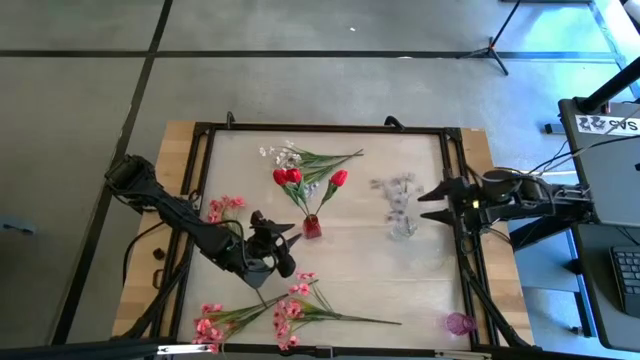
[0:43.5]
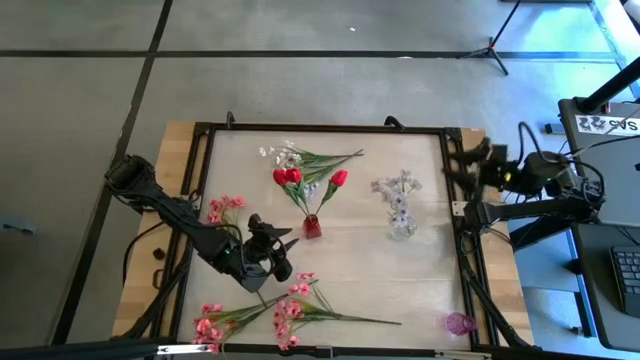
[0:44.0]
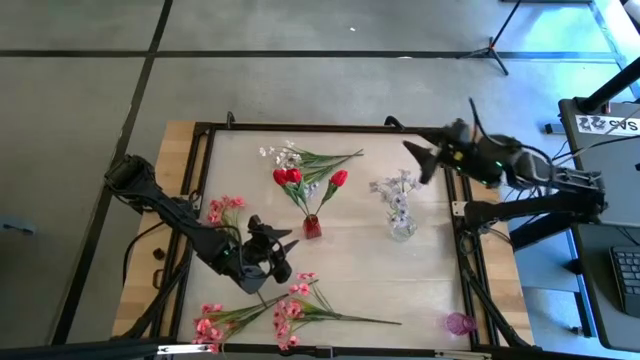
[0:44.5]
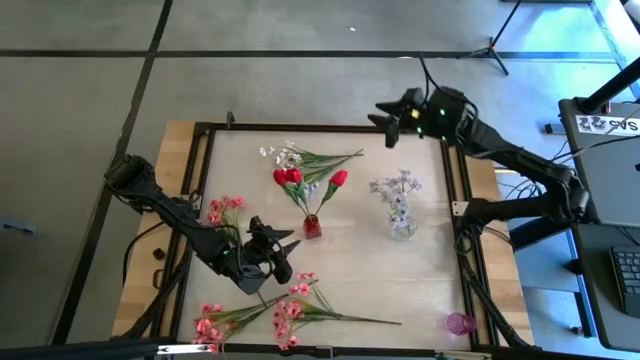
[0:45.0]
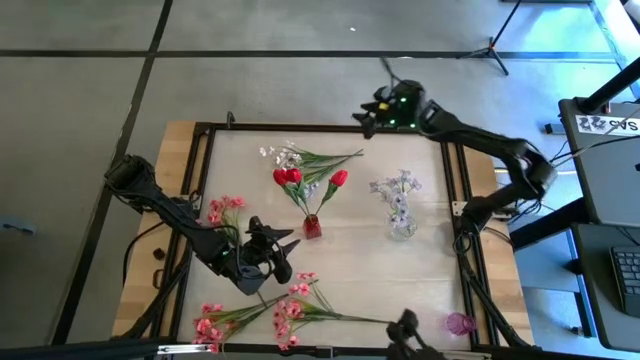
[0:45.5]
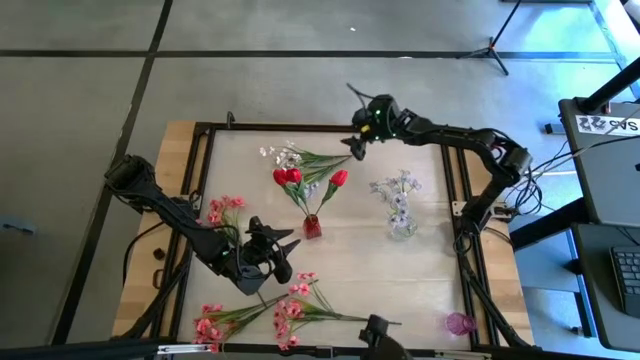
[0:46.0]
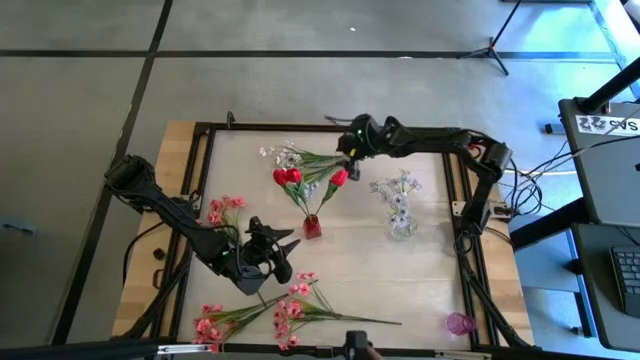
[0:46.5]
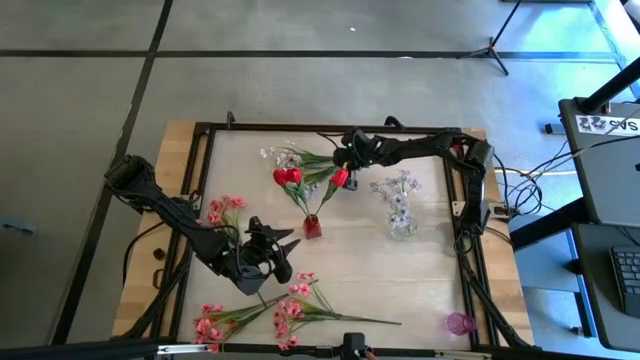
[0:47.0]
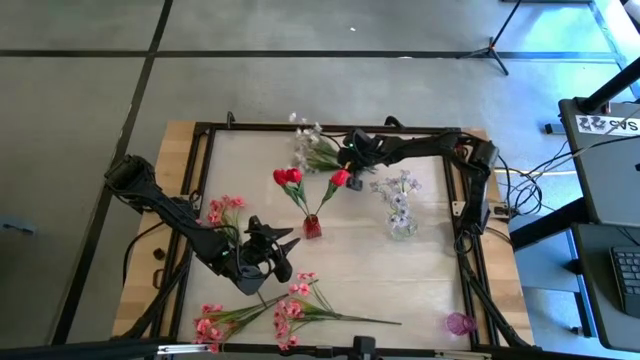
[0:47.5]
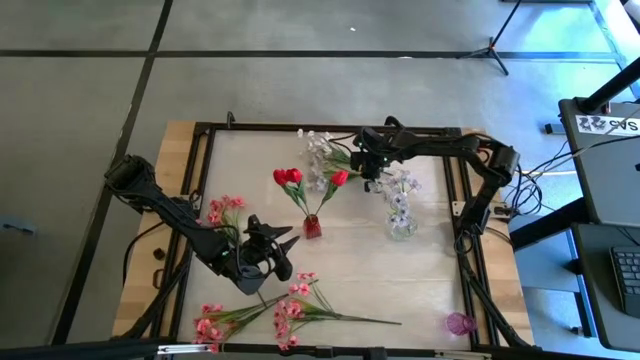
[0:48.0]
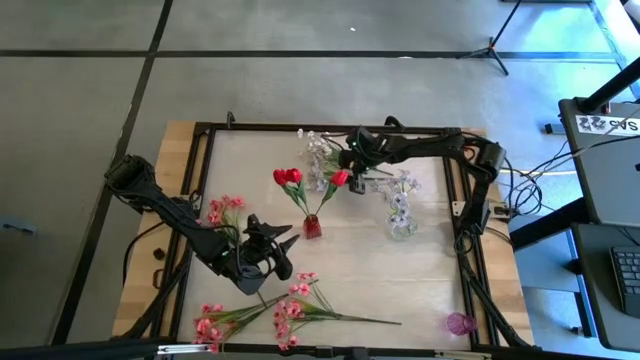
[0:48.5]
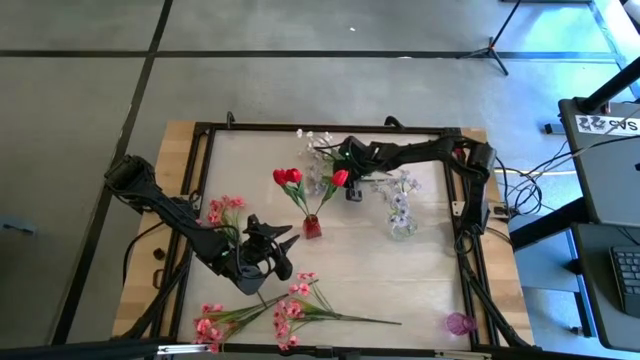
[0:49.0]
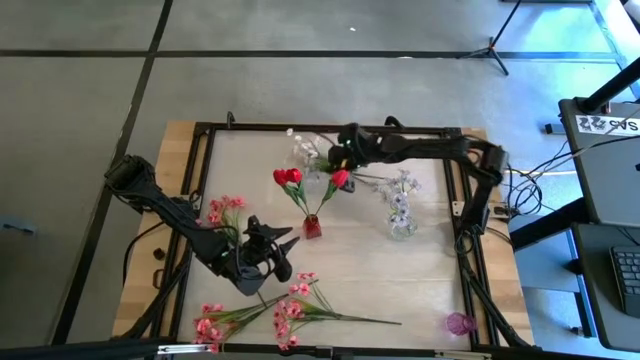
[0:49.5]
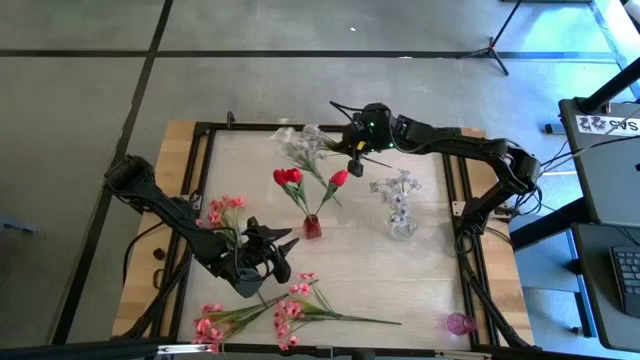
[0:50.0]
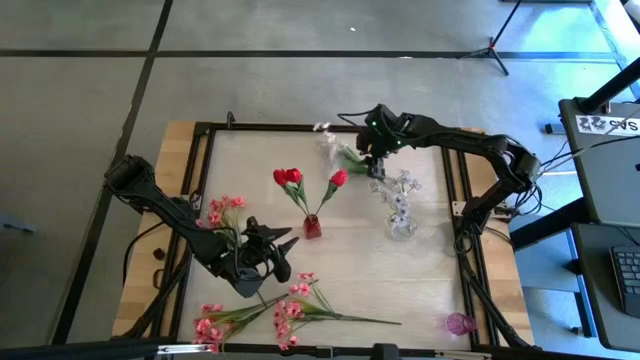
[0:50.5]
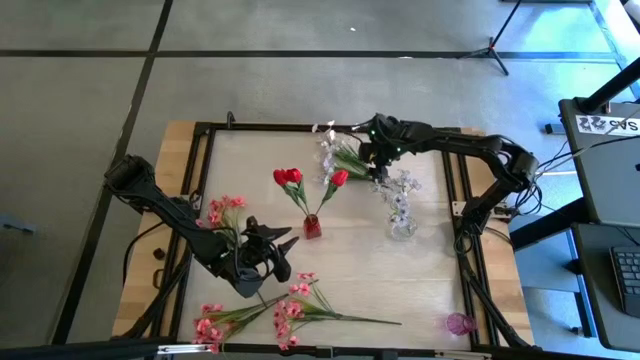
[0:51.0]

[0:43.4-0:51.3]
Task: Sort flowers into vase by color
Put the bottom white flowers into the transparent vase

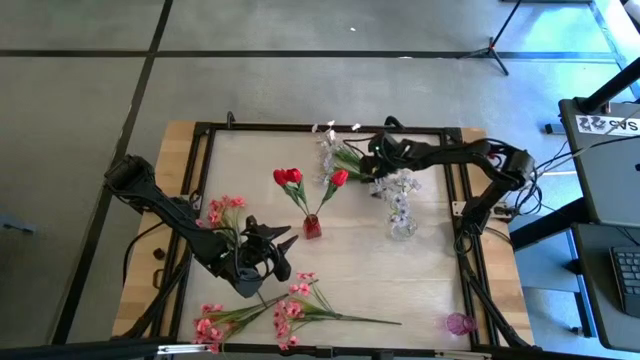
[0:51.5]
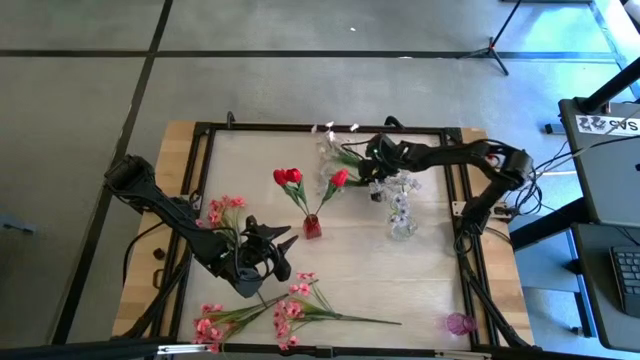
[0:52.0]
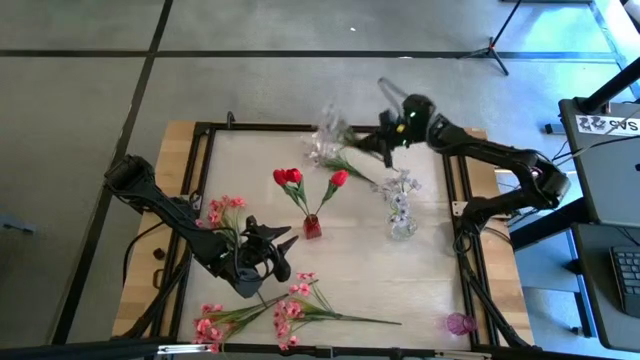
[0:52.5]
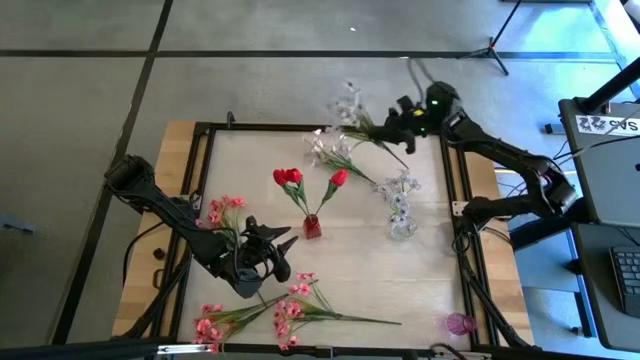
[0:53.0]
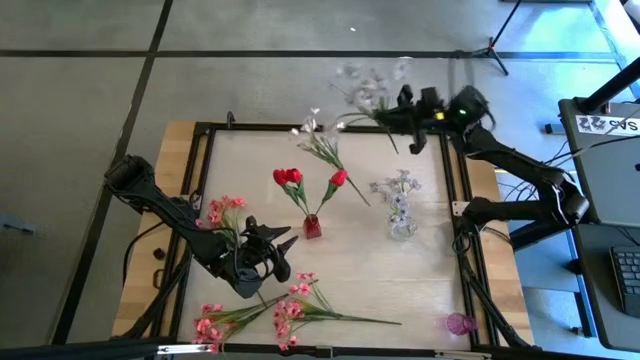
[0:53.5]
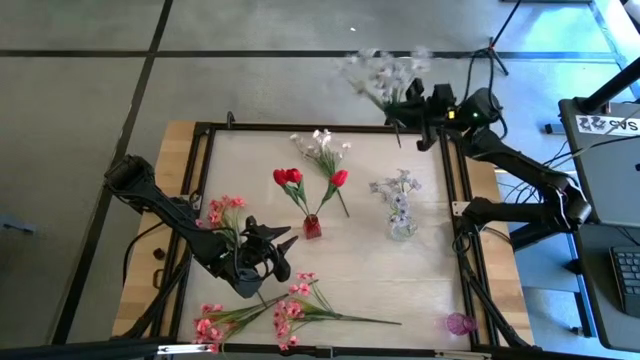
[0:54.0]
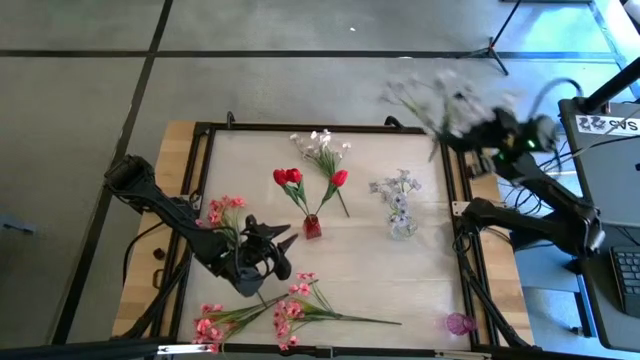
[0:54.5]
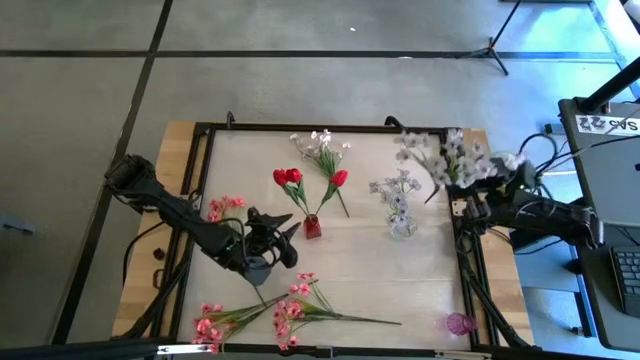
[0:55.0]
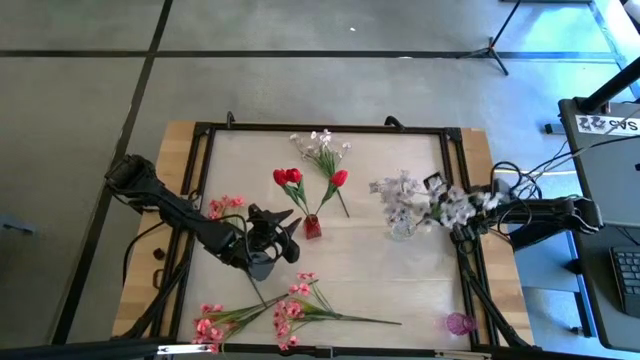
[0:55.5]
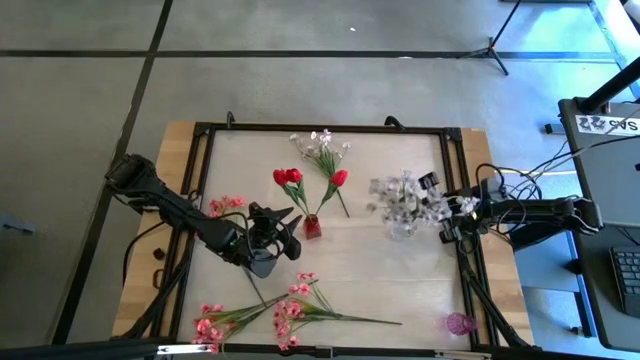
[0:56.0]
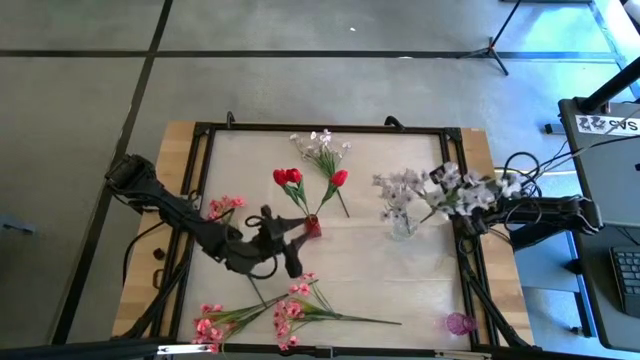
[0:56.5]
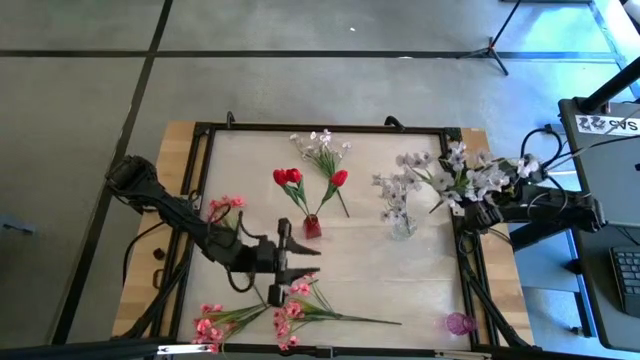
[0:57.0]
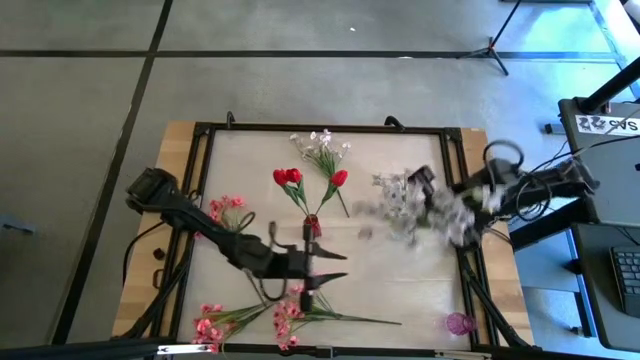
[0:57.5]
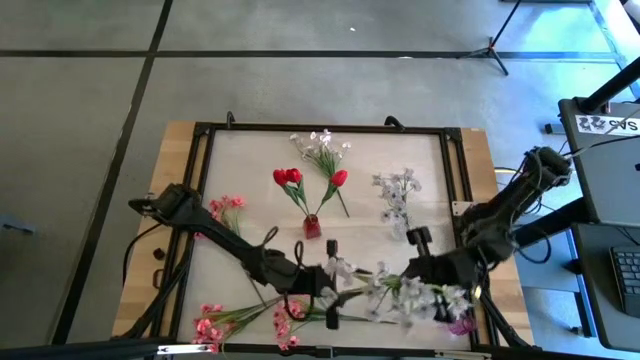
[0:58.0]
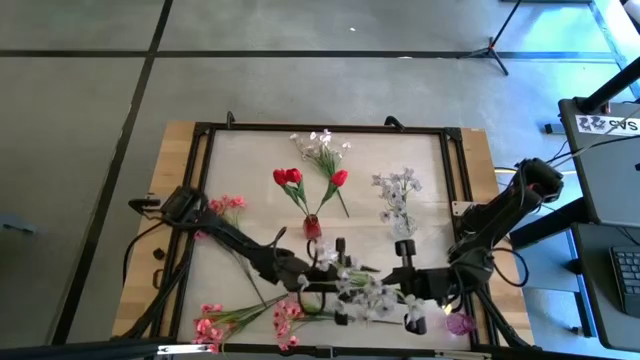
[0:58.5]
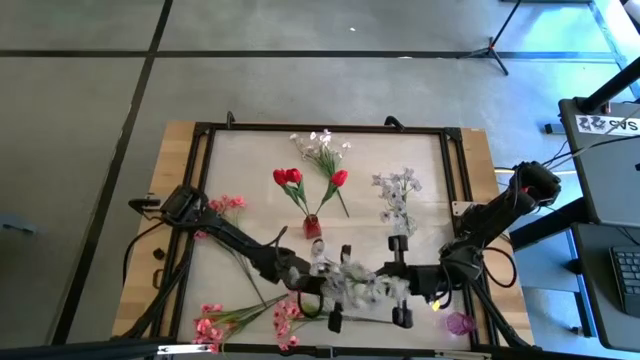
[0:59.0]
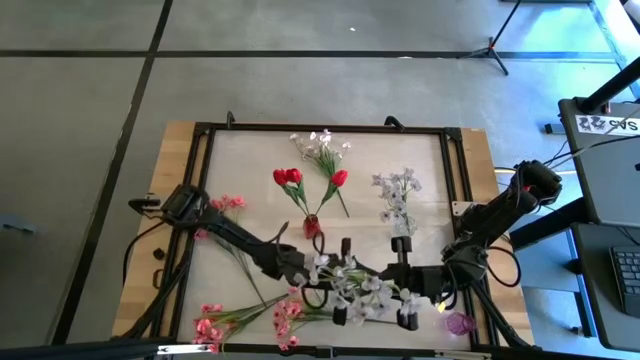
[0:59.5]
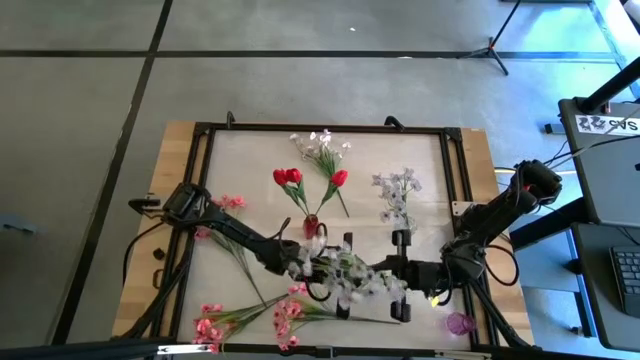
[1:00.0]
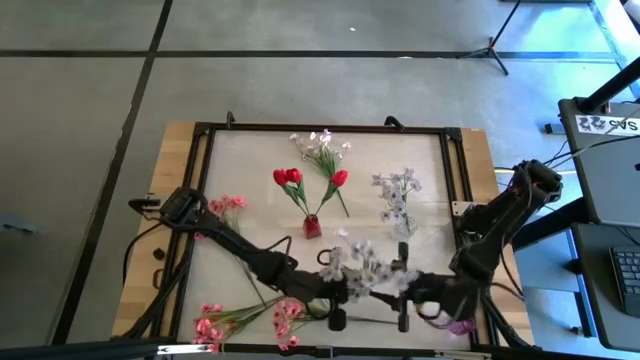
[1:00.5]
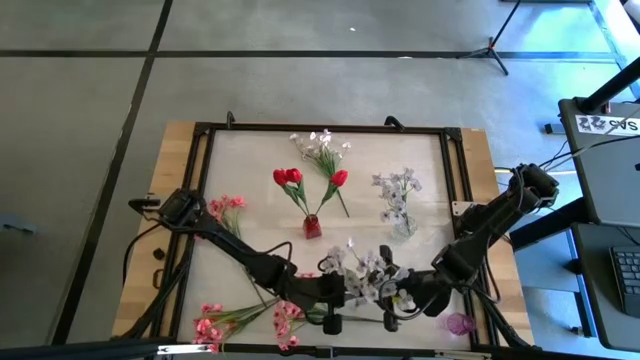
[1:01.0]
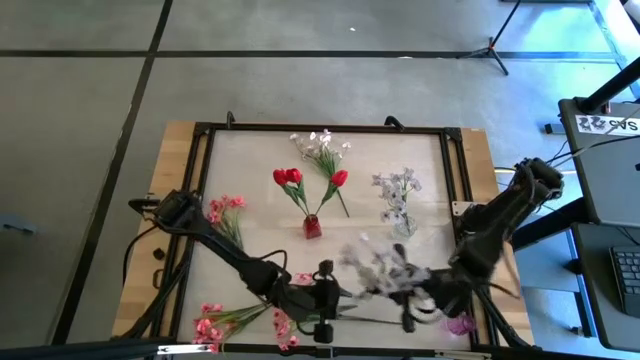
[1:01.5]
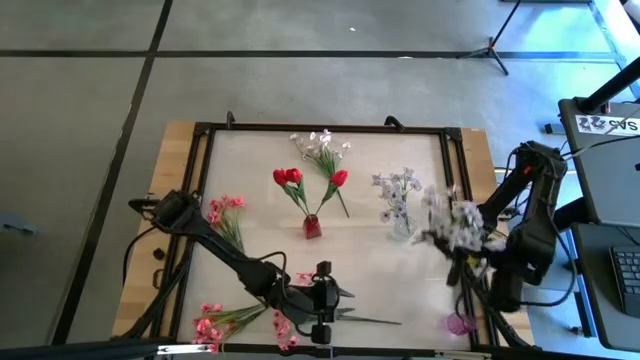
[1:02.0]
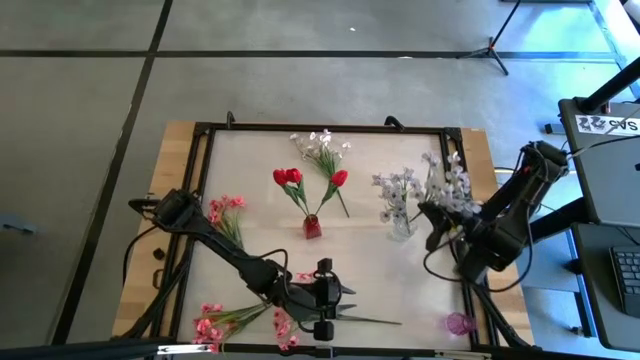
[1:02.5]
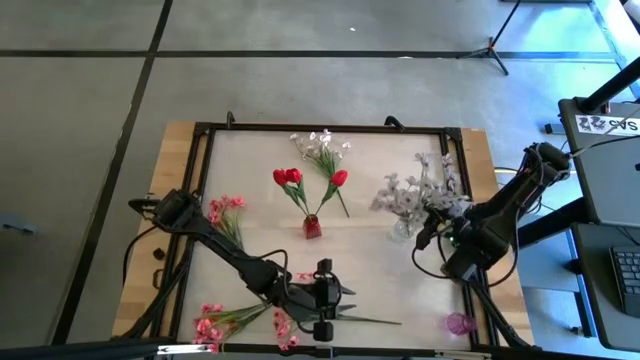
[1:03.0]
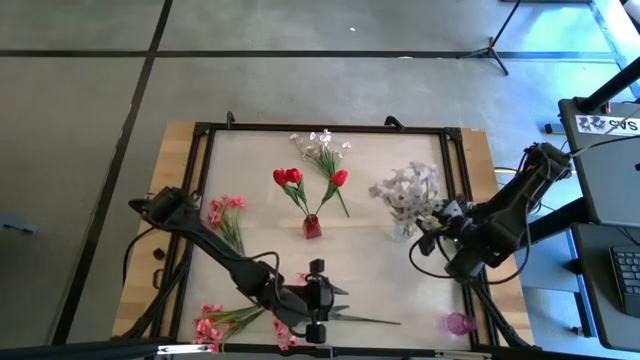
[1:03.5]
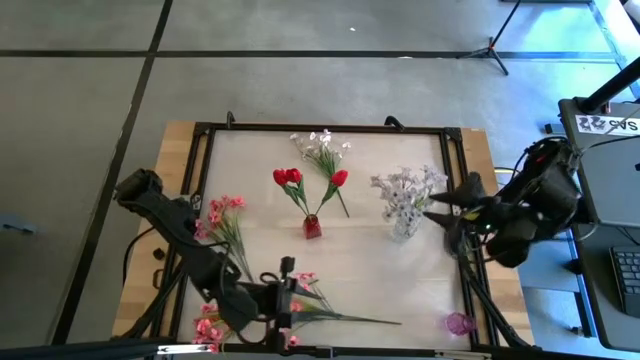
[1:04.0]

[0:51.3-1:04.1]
Put the bottom white flowers into the transparent vase
